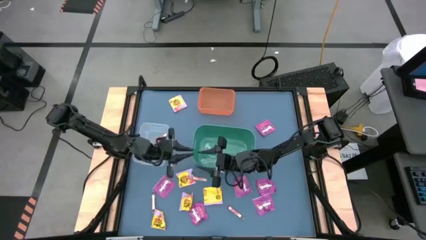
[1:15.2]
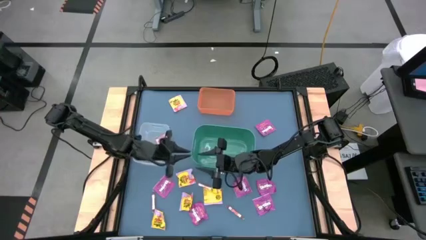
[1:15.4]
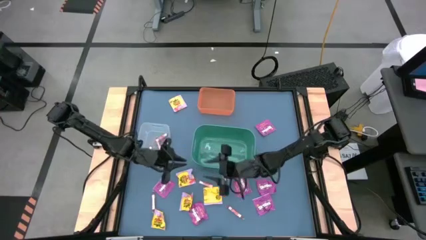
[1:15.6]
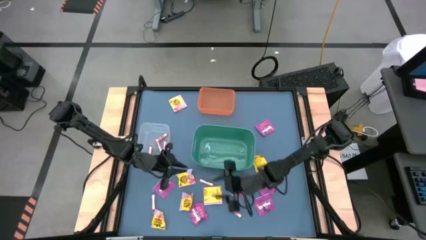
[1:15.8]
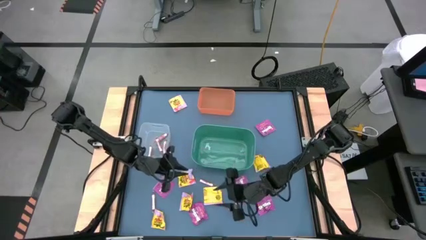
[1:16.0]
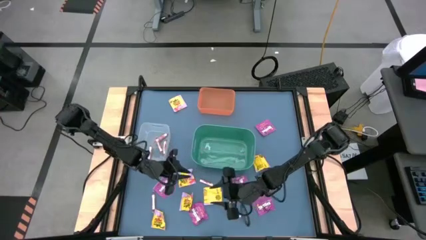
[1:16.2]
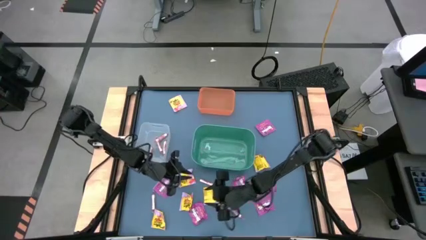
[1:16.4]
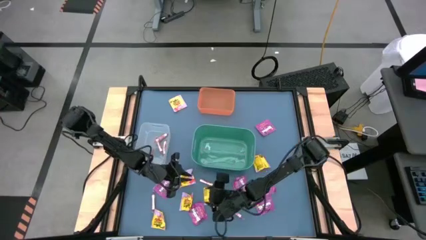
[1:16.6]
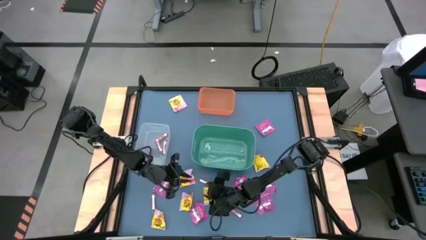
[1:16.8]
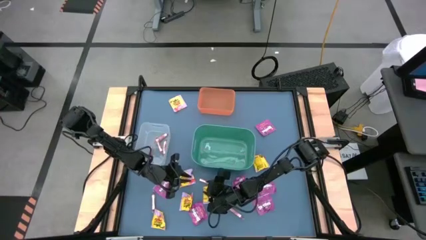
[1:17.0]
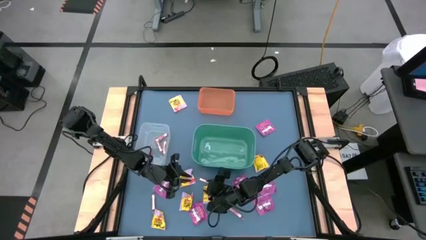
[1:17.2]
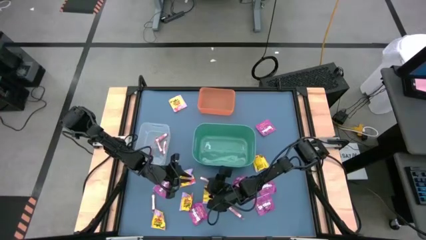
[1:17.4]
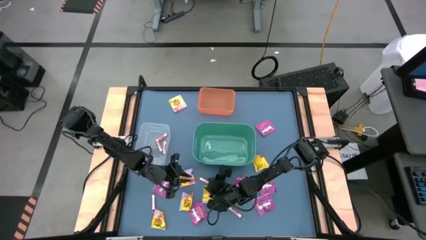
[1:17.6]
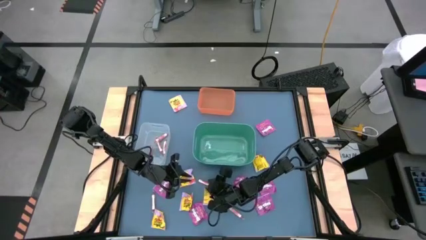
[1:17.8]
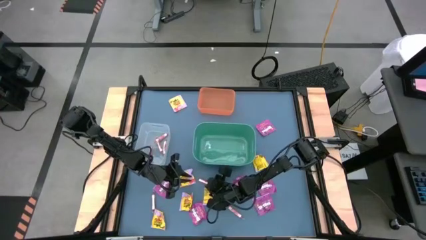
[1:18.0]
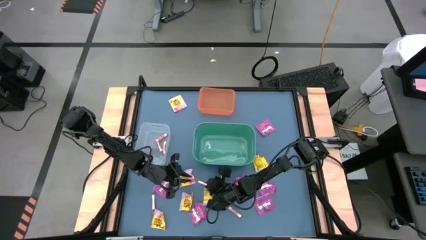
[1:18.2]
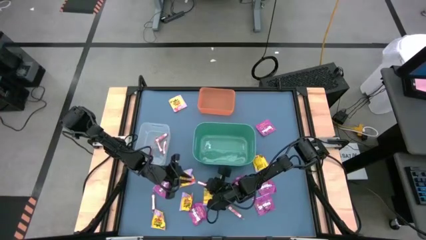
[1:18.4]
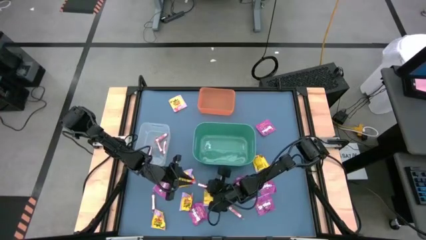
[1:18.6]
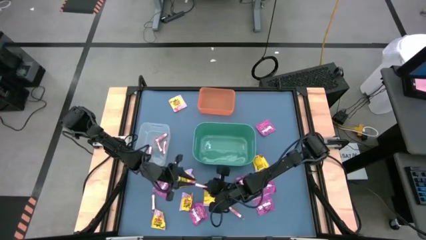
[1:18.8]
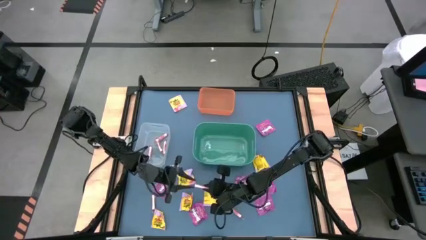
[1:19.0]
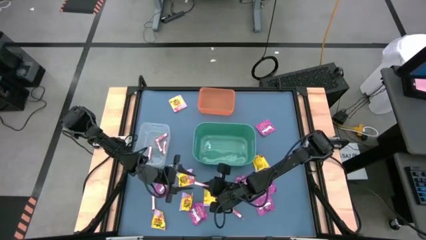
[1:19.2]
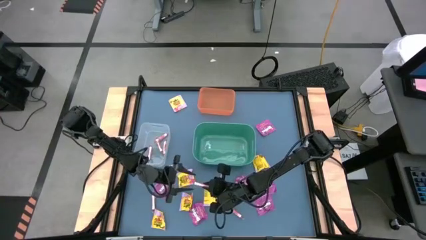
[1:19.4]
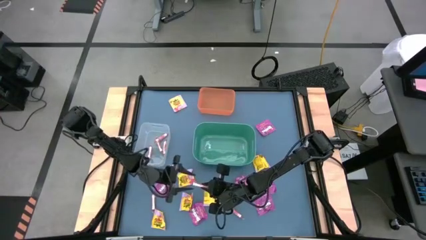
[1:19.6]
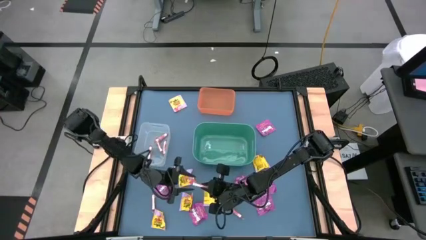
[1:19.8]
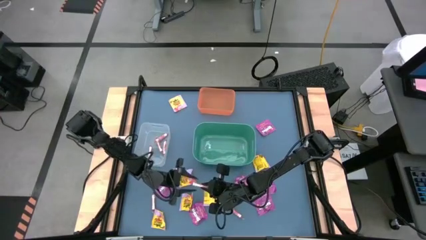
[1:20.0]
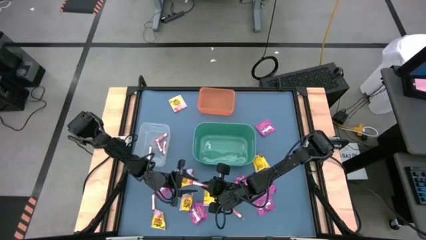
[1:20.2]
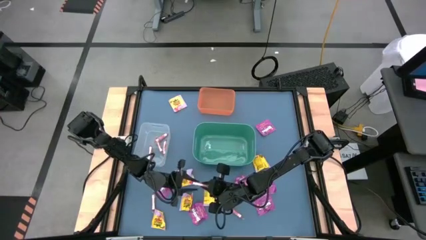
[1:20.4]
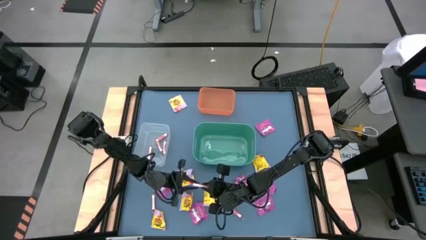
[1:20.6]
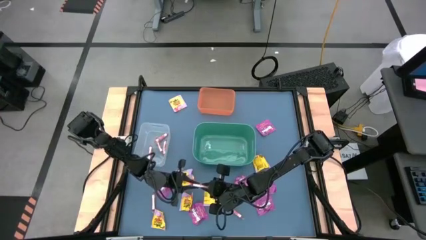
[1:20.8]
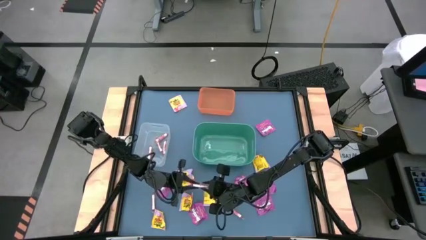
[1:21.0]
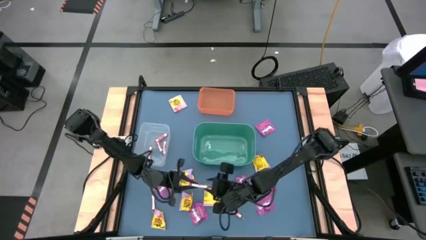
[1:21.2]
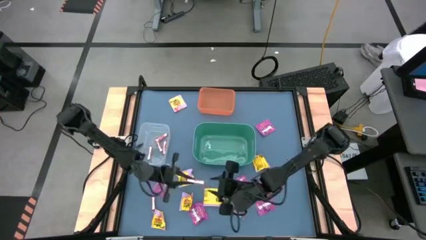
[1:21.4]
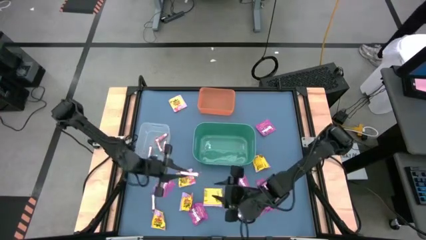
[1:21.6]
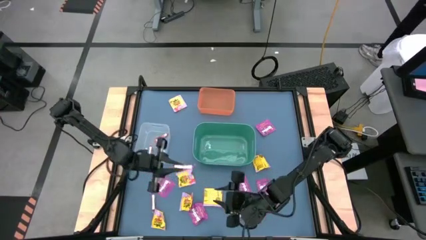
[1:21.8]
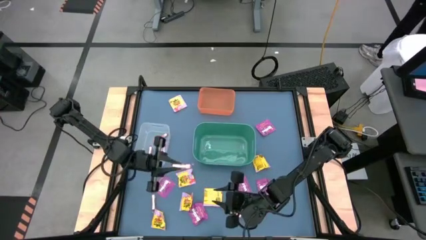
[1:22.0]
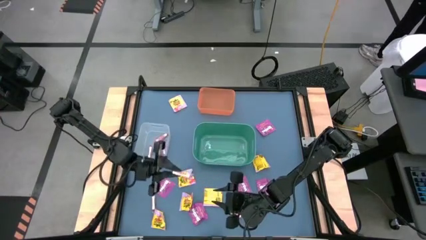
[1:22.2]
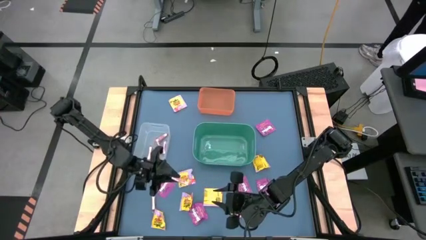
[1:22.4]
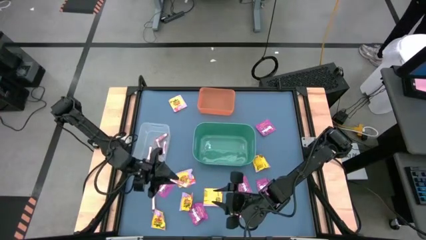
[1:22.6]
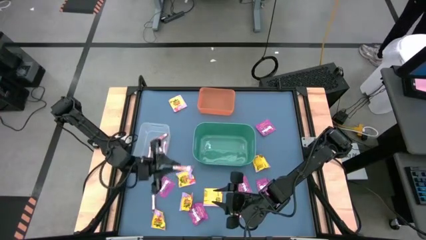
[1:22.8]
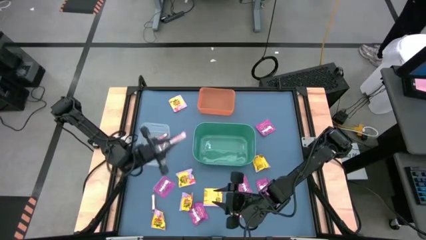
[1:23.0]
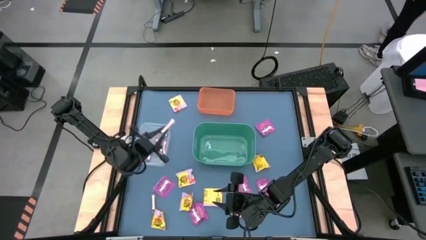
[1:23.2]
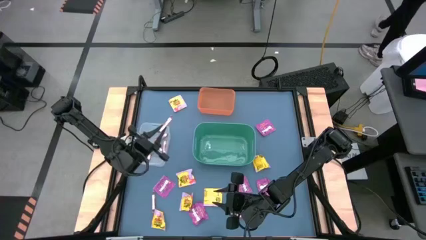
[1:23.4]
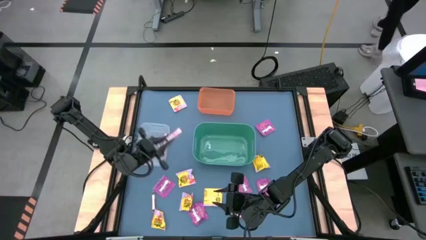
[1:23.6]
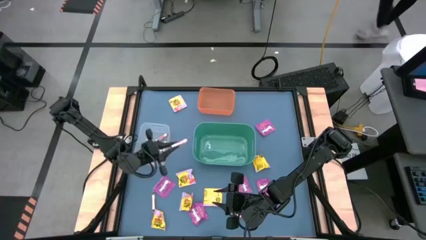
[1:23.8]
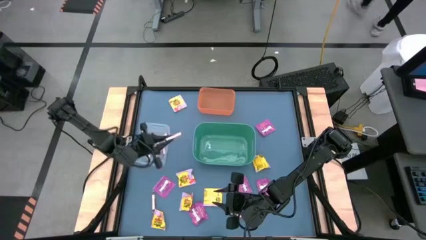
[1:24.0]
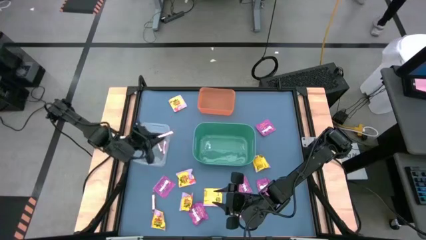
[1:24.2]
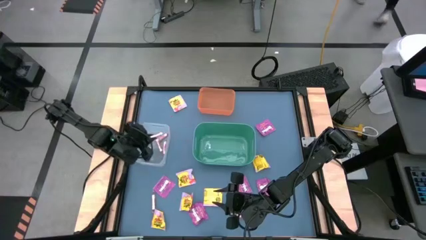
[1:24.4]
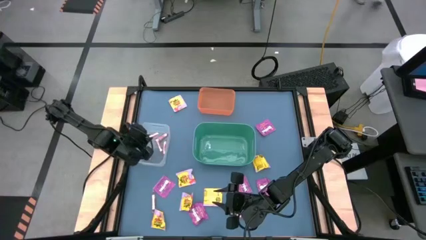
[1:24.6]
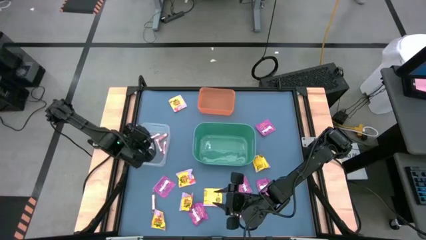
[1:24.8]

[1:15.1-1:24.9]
Task: Sort candy
Put the orange candy into the transparent bin

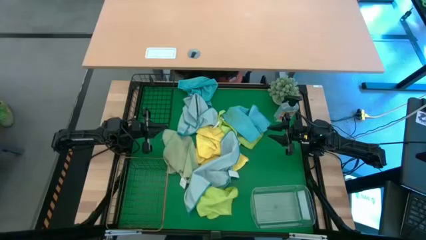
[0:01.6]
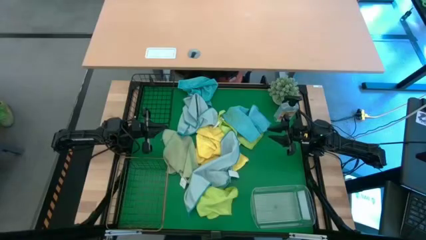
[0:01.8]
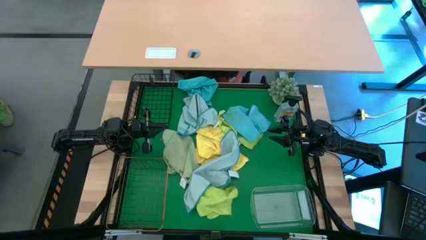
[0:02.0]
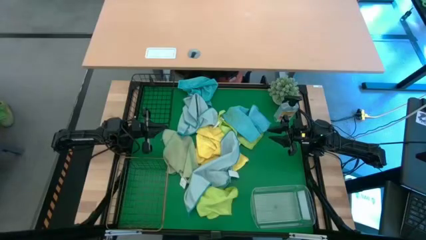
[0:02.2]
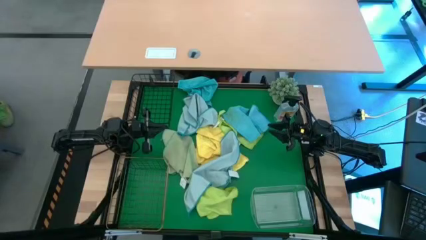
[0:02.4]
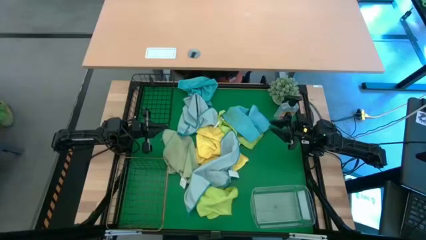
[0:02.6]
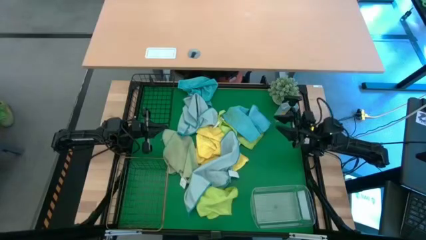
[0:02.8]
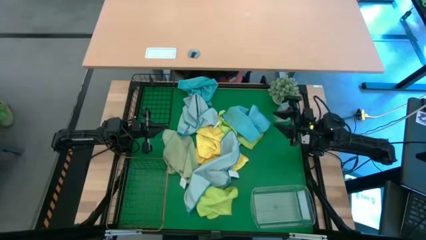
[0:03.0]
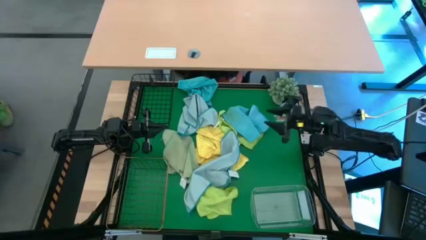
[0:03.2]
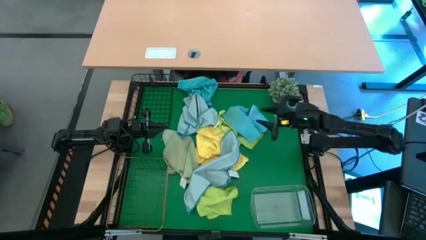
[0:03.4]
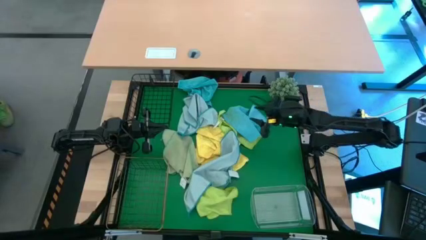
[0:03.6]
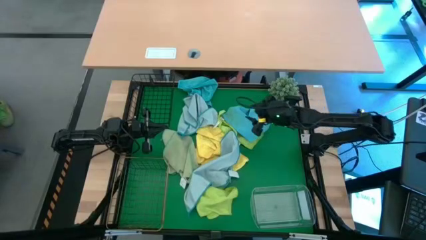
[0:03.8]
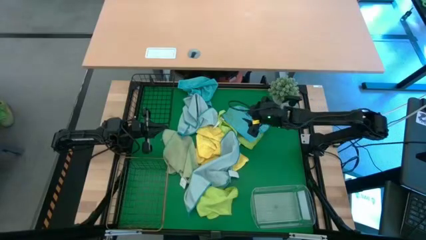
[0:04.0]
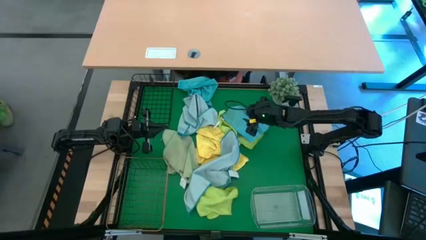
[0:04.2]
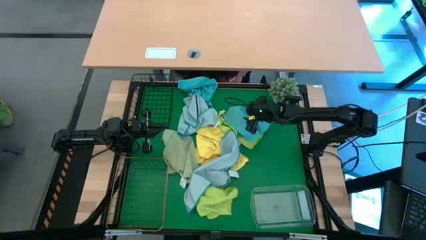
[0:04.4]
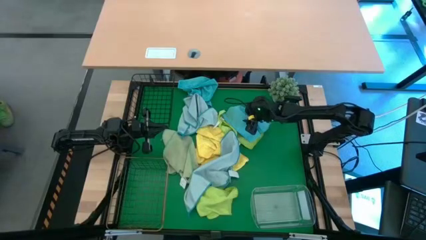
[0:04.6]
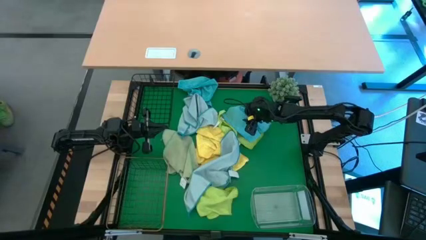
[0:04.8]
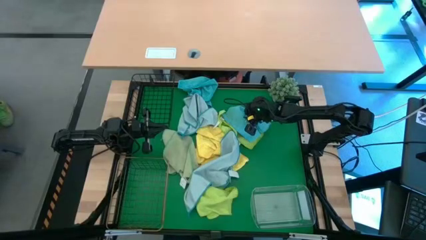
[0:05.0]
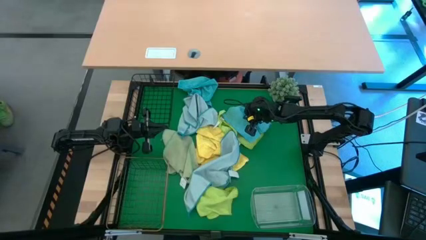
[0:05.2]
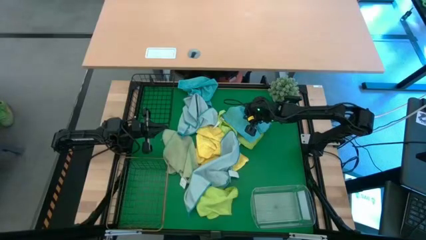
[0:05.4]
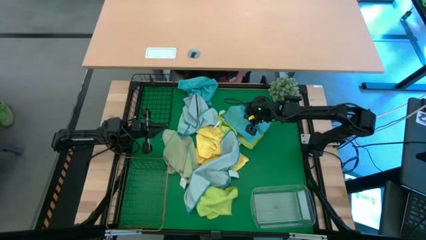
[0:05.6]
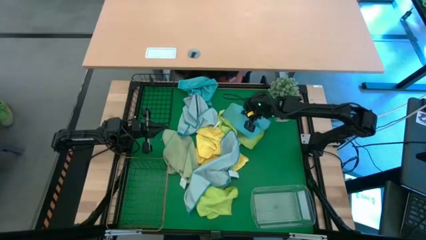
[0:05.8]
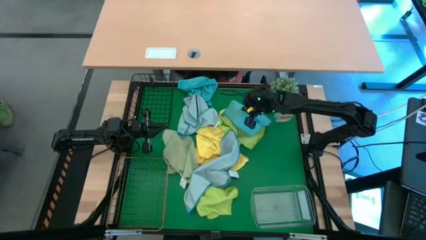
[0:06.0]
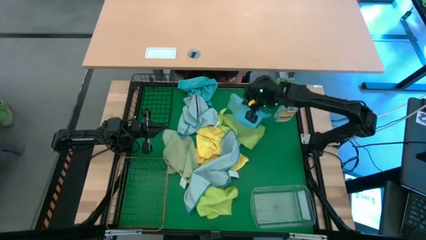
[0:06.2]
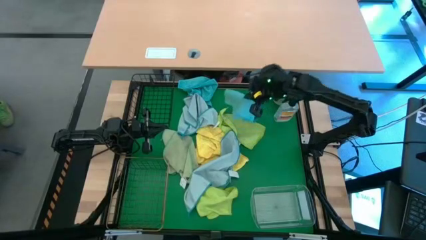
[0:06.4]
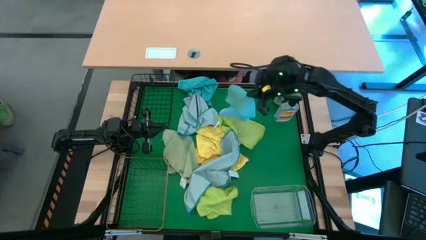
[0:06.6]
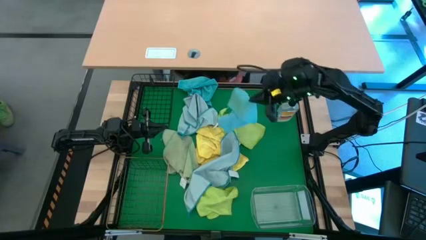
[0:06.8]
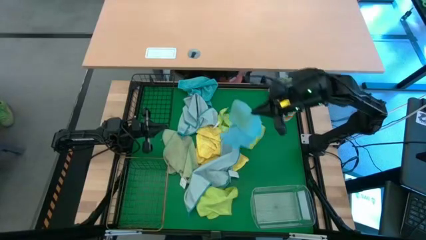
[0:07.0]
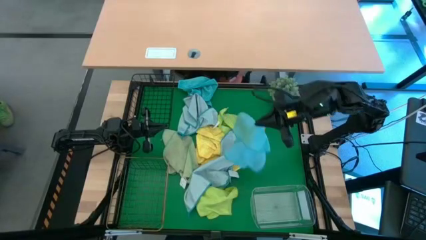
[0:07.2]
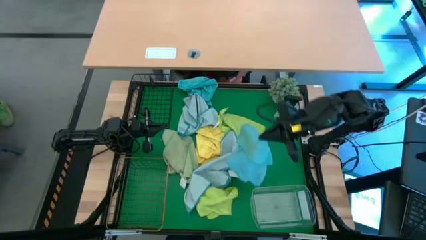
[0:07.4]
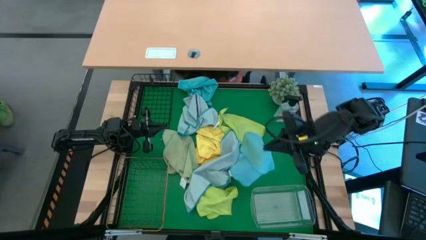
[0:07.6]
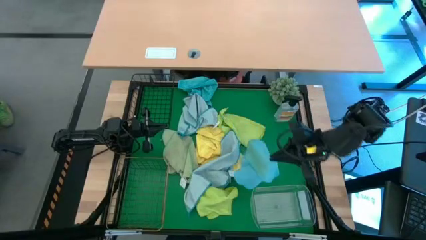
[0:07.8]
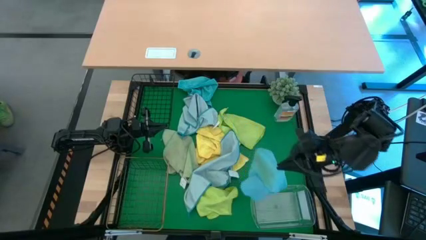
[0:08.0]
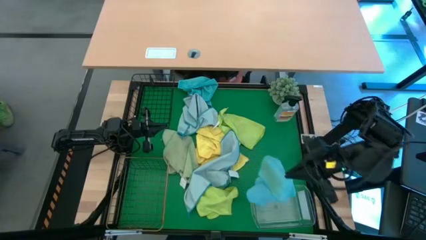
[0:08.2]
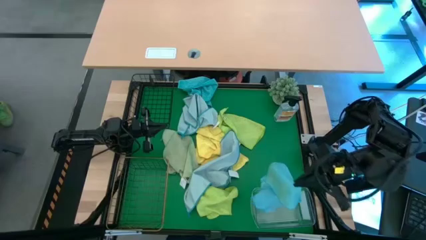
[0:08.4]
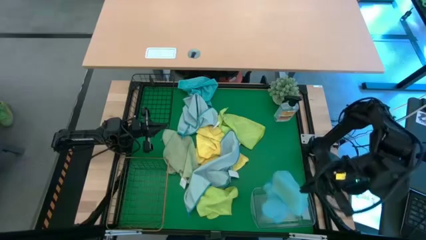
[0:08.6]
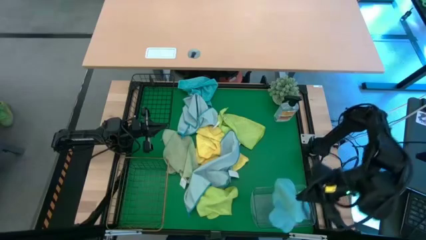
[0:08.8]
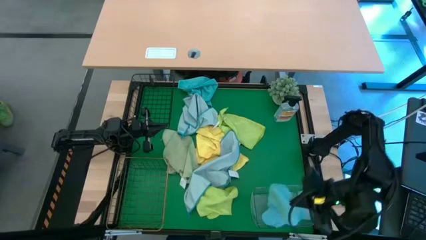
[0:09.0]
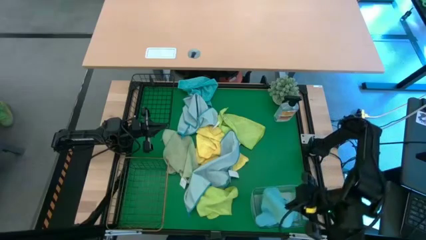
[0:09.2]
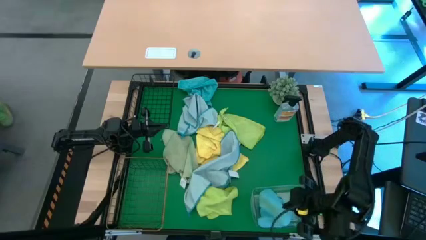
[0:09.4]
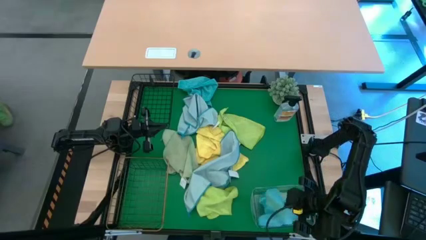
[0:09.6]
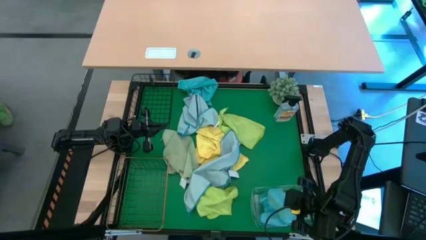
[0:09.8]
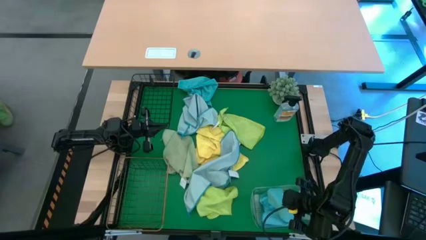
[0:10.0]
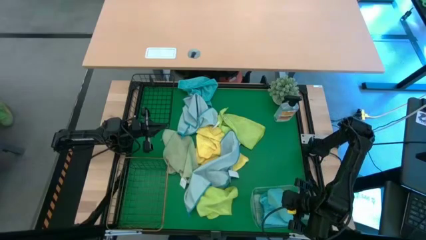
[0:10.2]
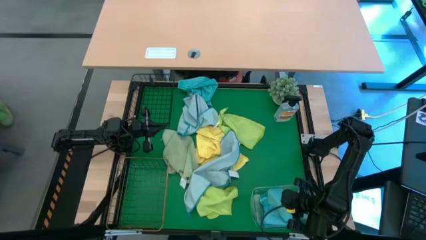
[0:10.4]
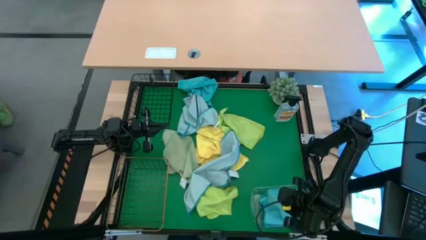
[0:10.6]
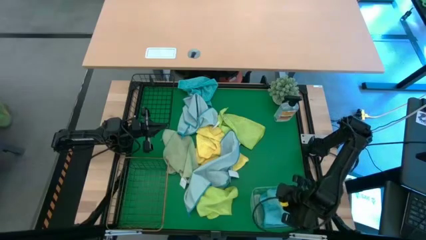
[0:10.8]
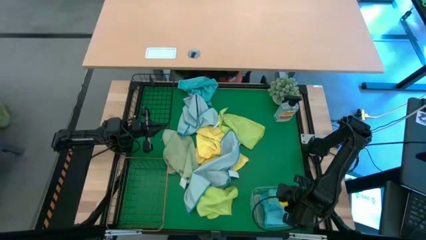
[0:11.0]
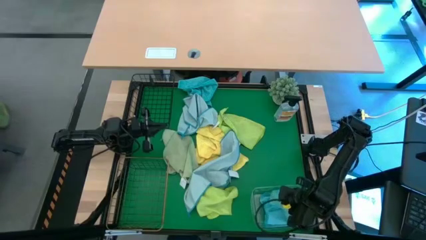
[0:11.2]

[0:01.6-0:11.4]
Task: Sort microfiber towel by color & place in baskets
Put the bottom blue microfiber cloth into the transparent bin
